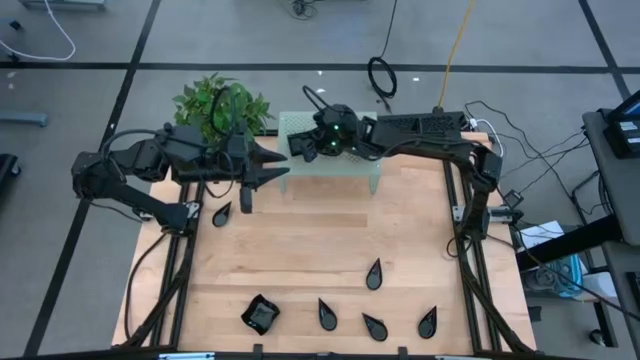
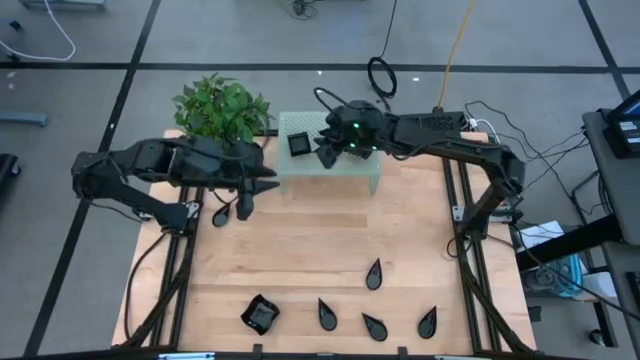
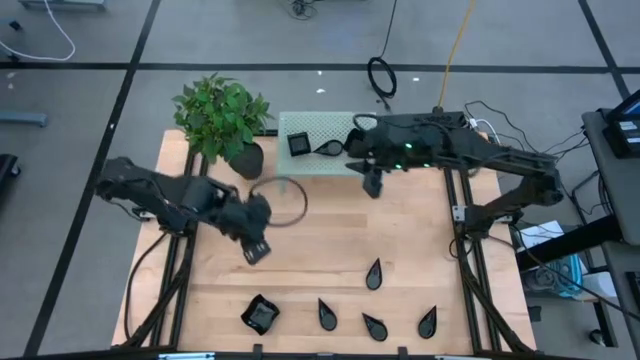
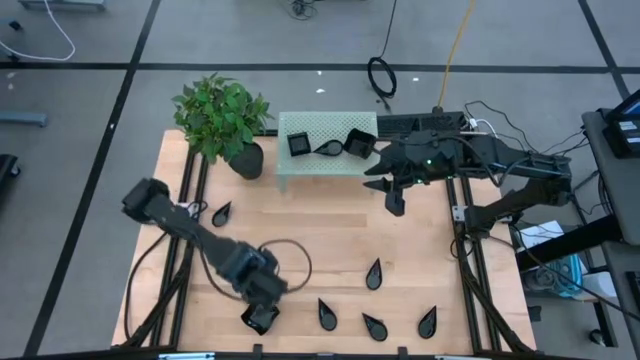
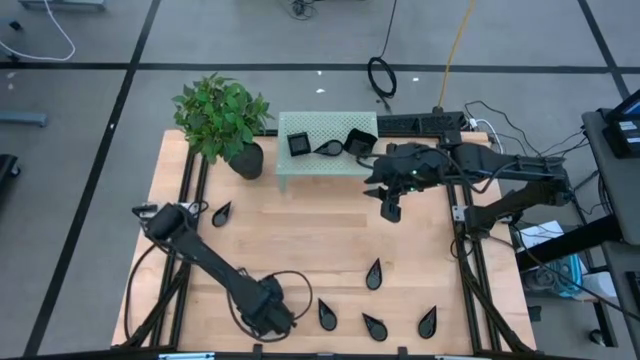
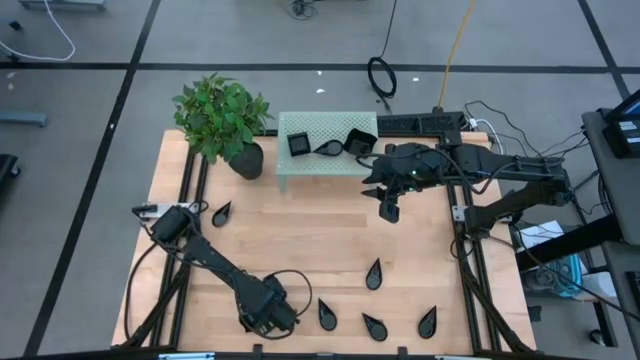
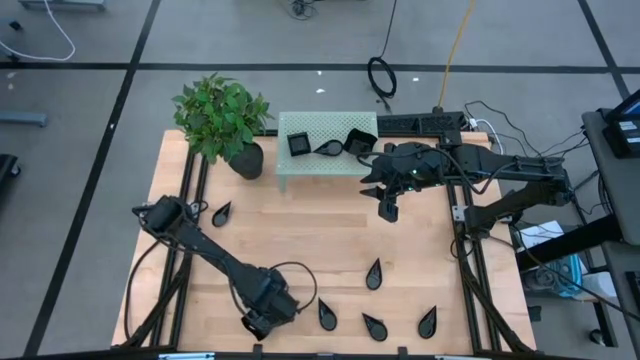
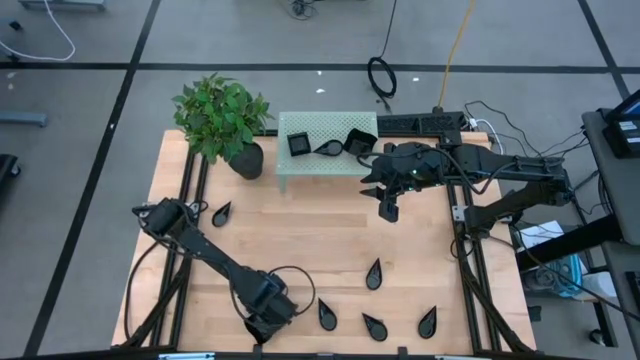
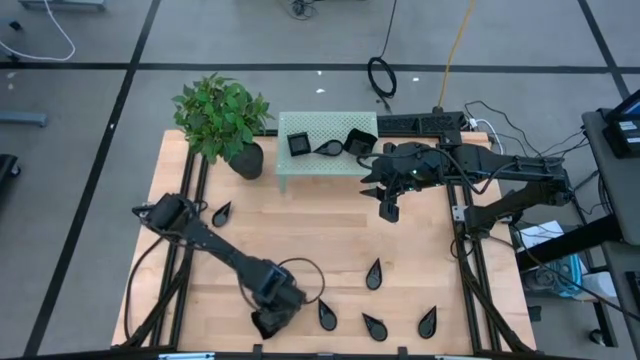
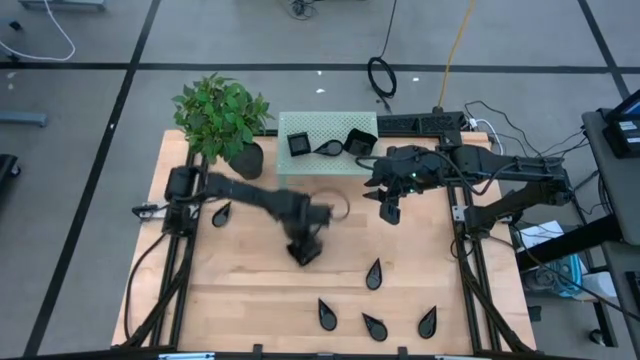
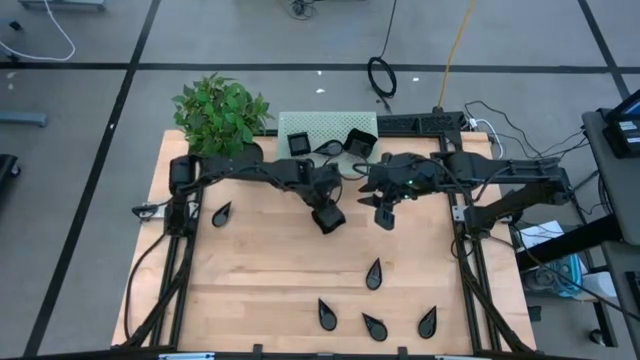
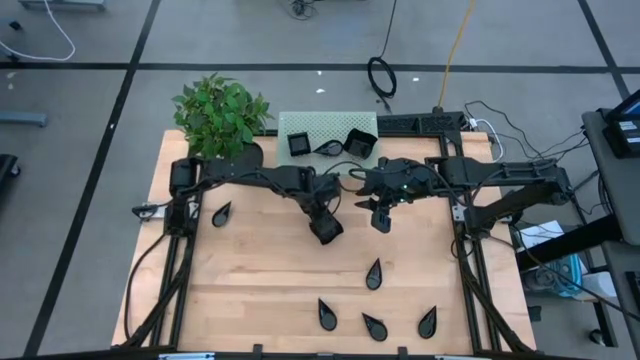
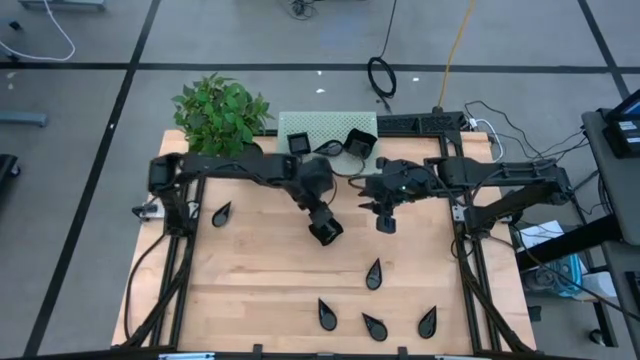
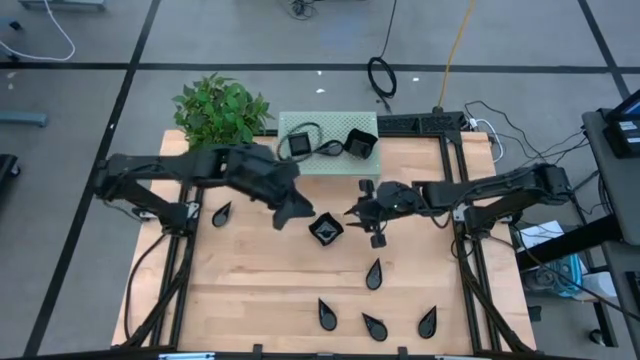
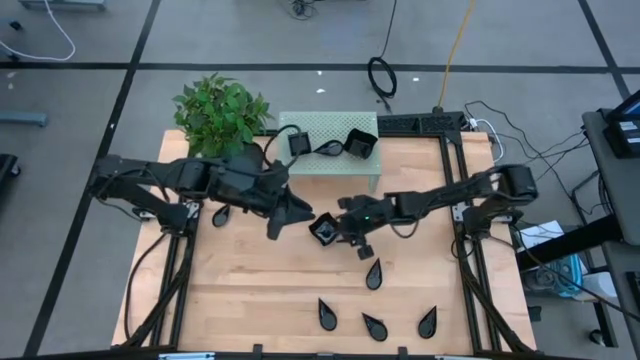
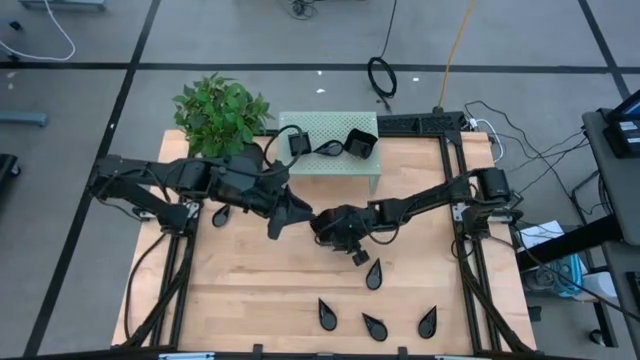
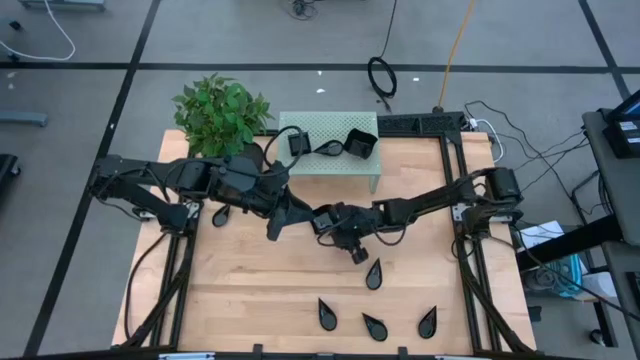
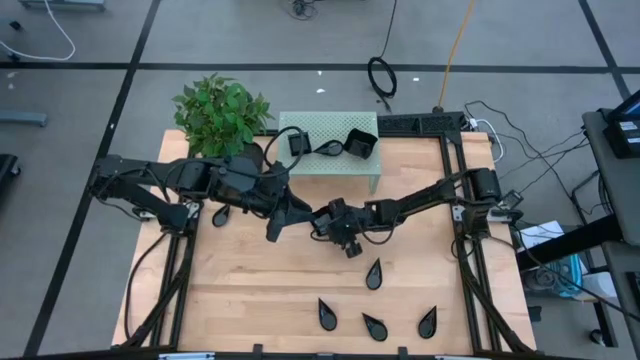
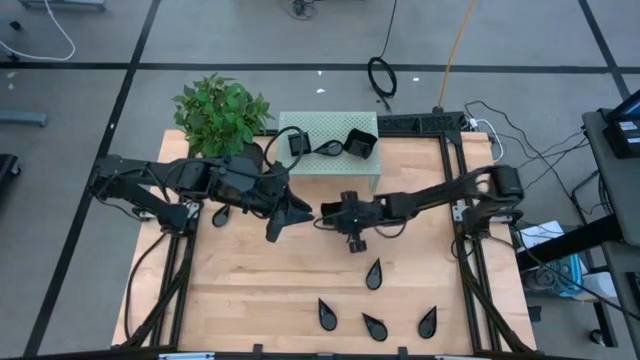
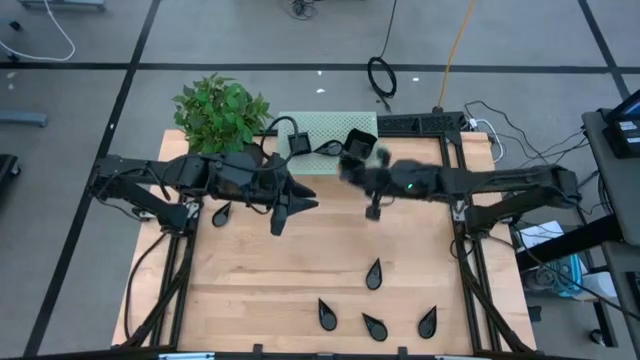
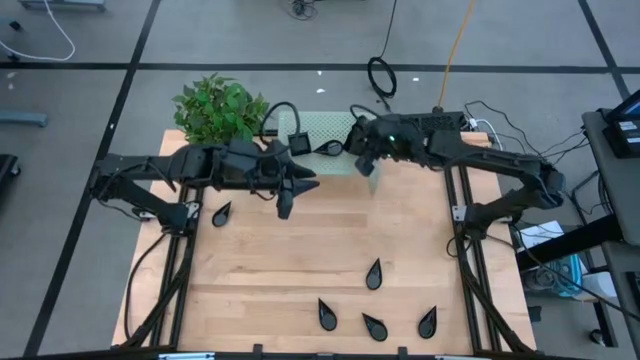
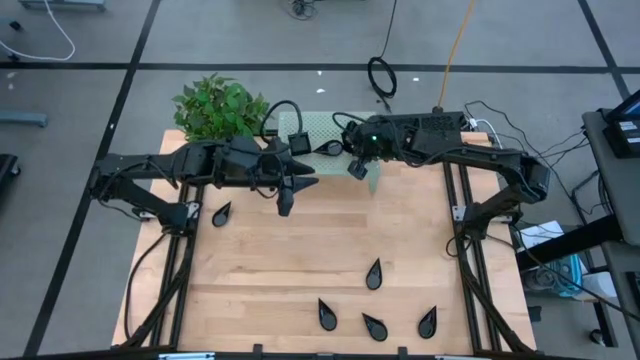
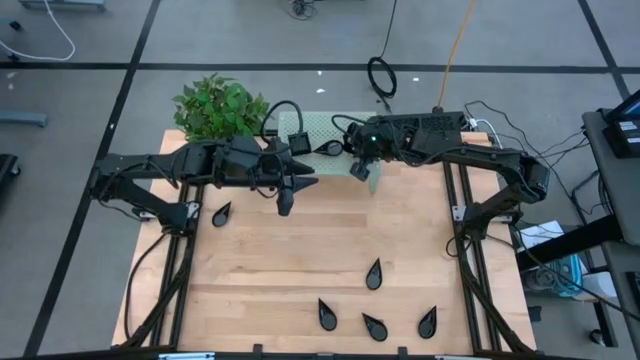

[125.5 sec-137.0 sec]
Task: Pick & Place Mini shaped plates
Stack the distorted square plate on top of the other distorted square plate on the shelf

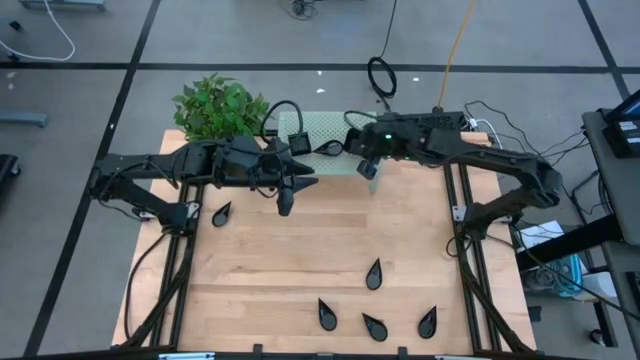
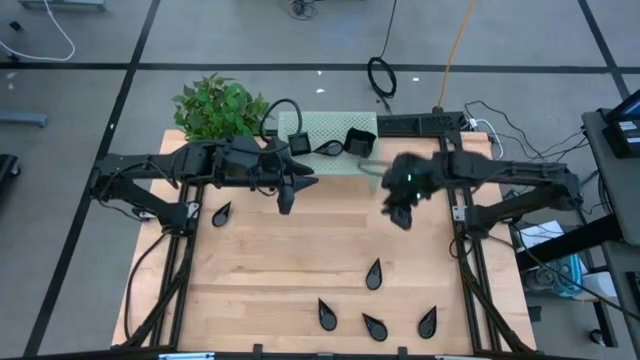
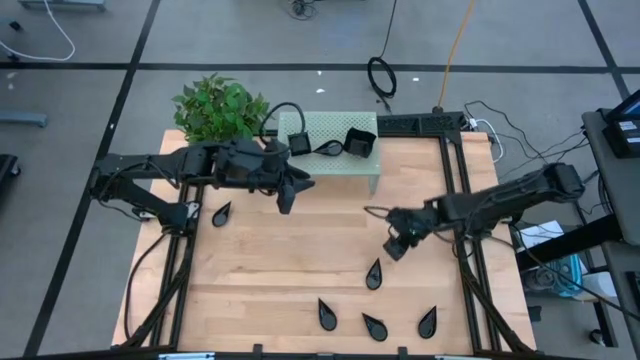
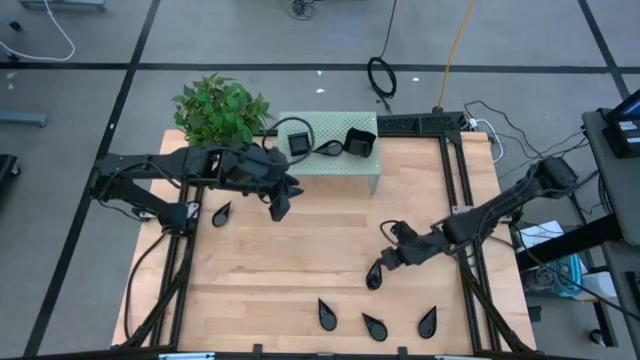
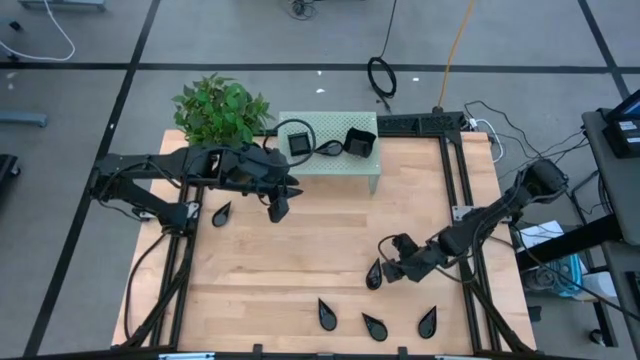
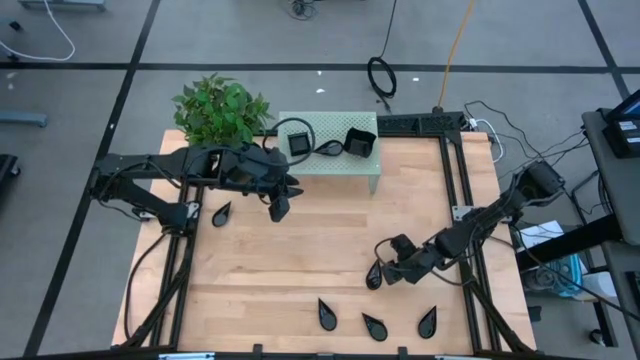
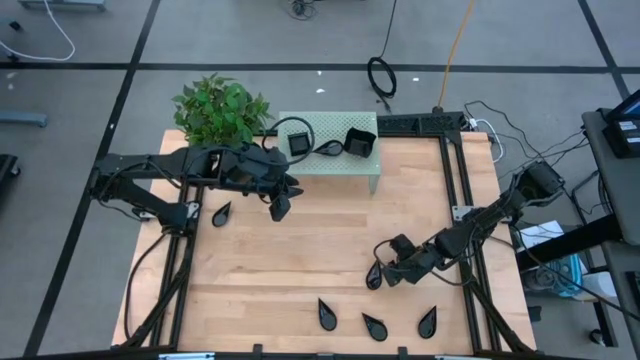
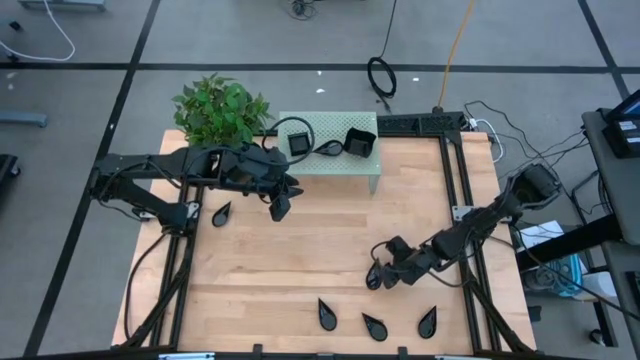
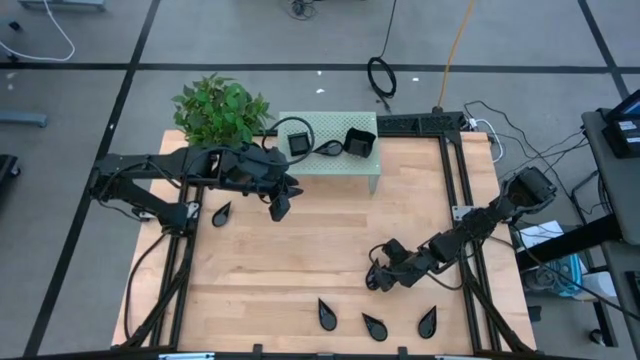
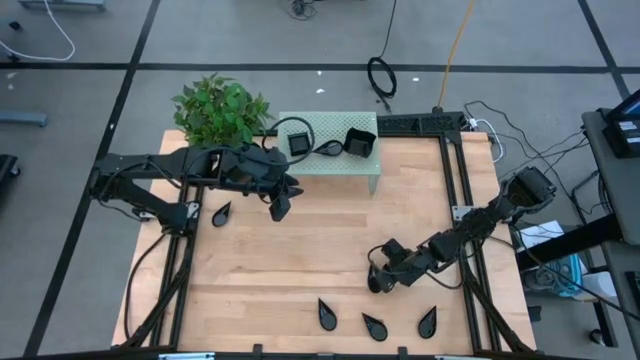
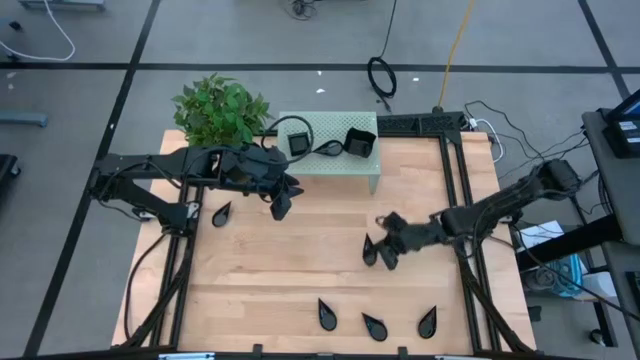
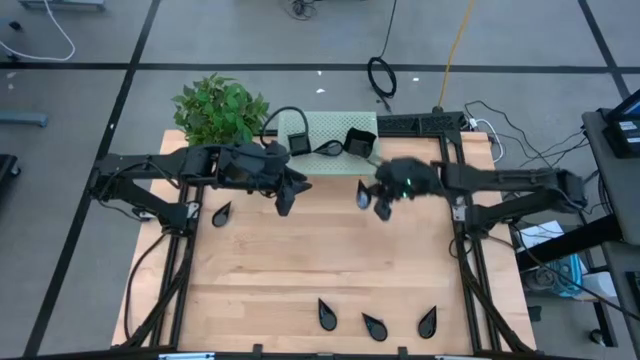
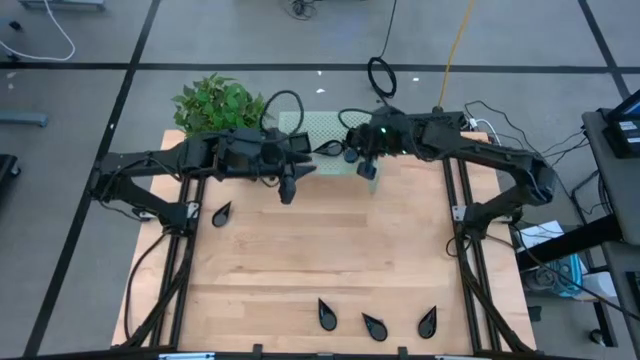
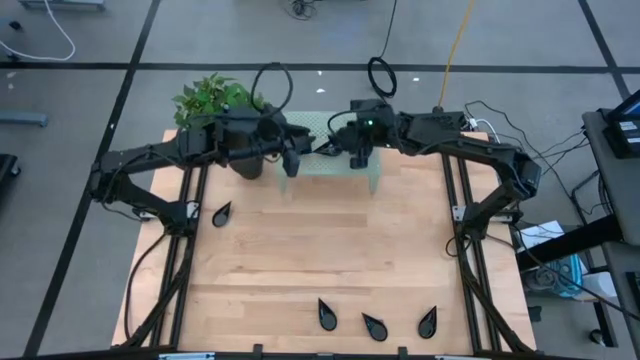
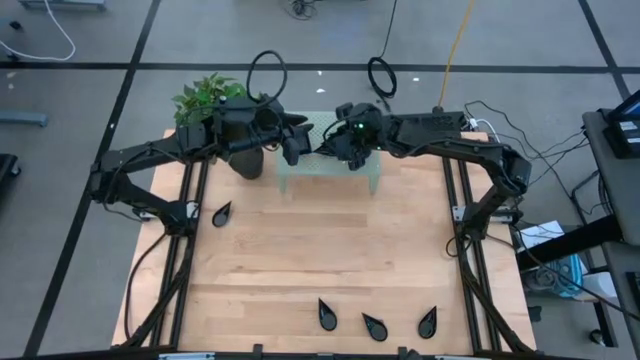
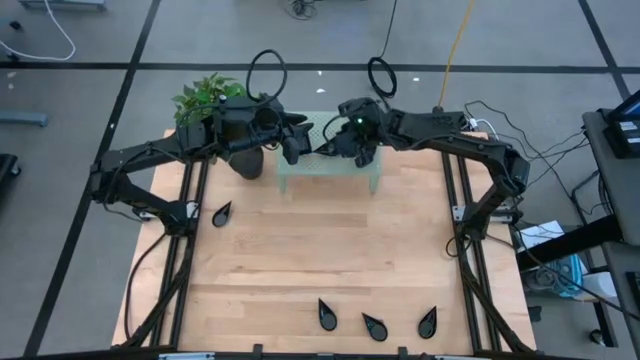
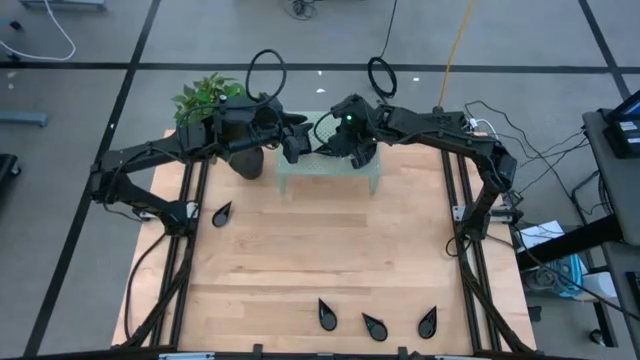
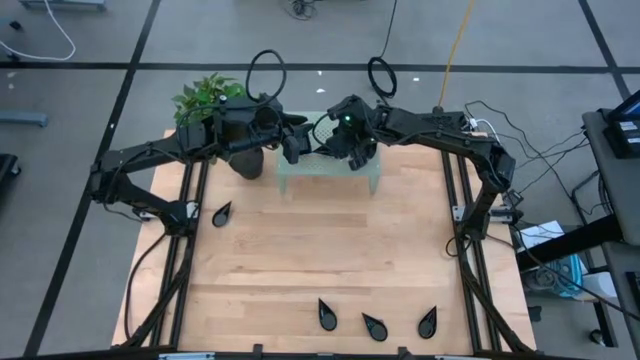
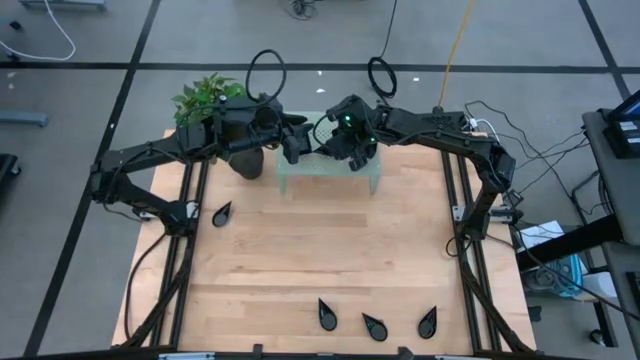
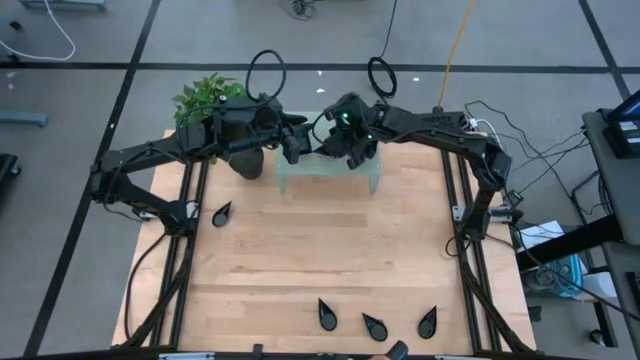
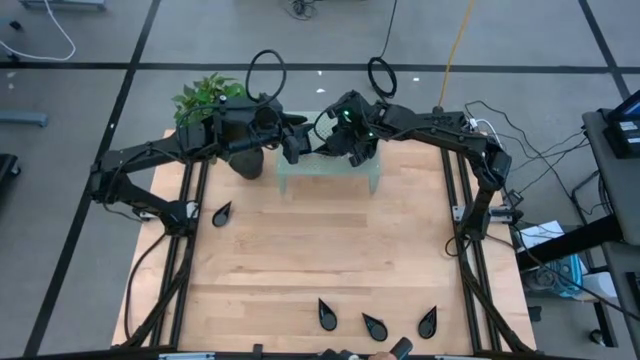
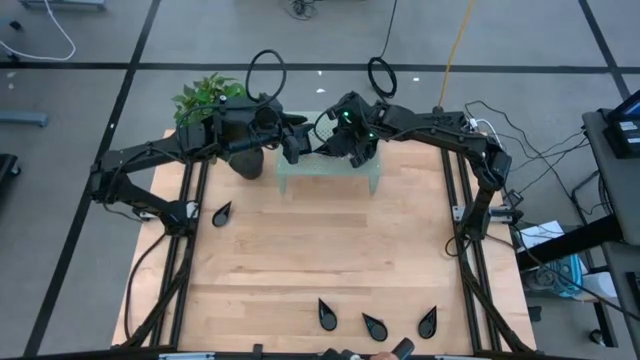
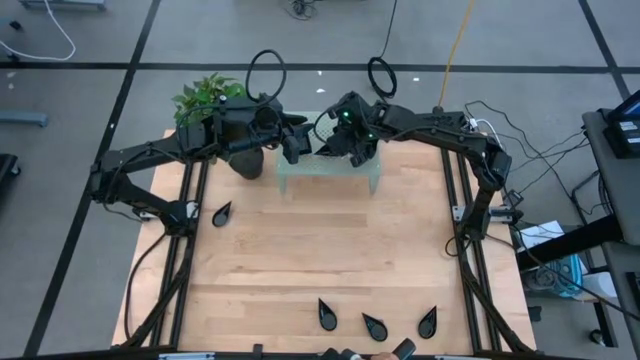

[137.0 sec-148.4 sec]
Stack the drop shaped plate on top of the other drop shaped plate on the shelf
